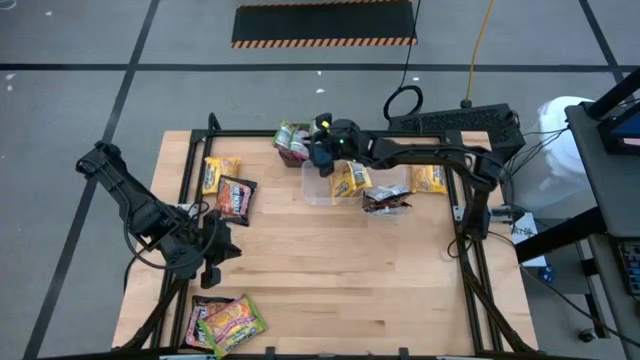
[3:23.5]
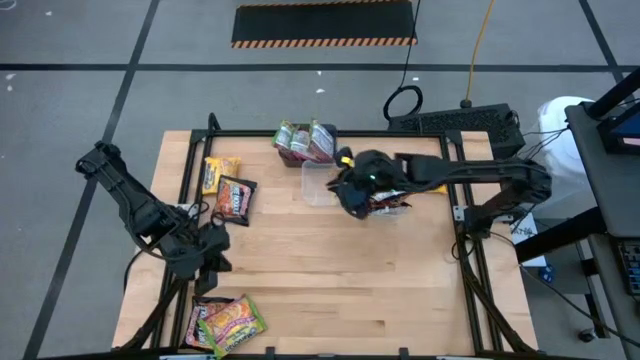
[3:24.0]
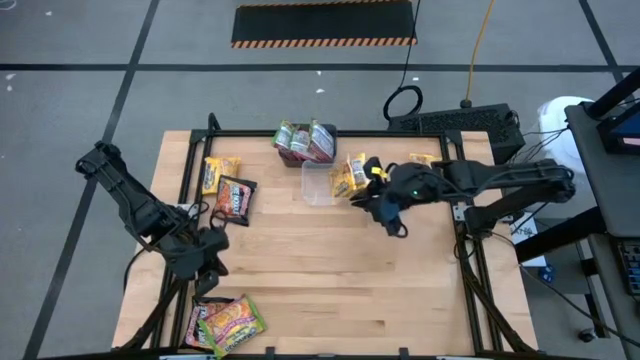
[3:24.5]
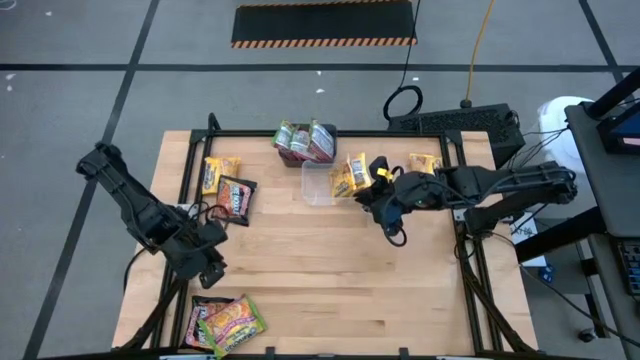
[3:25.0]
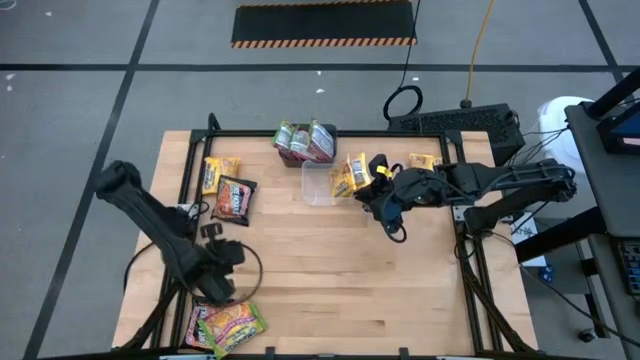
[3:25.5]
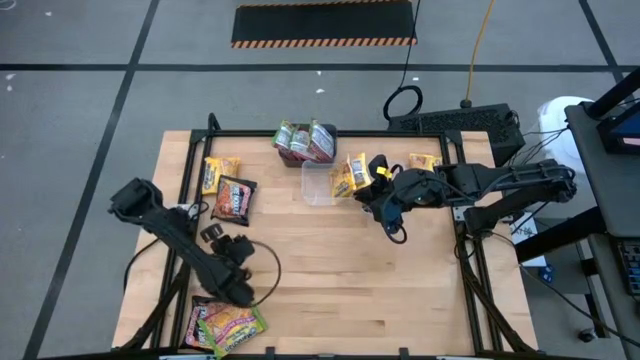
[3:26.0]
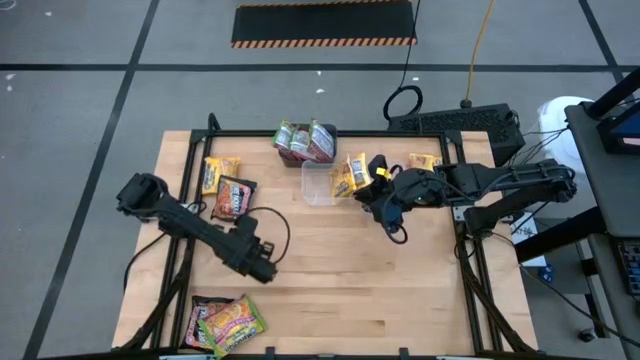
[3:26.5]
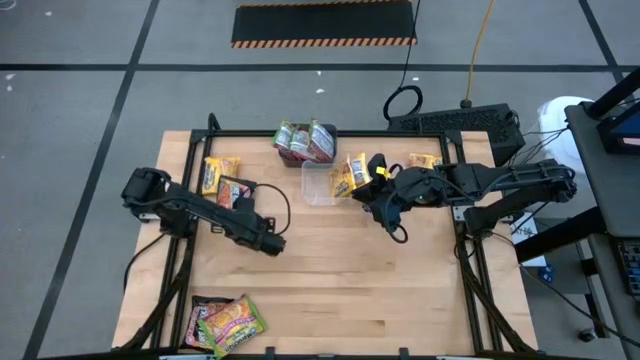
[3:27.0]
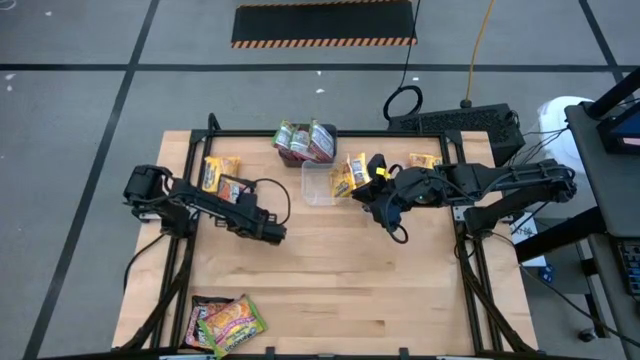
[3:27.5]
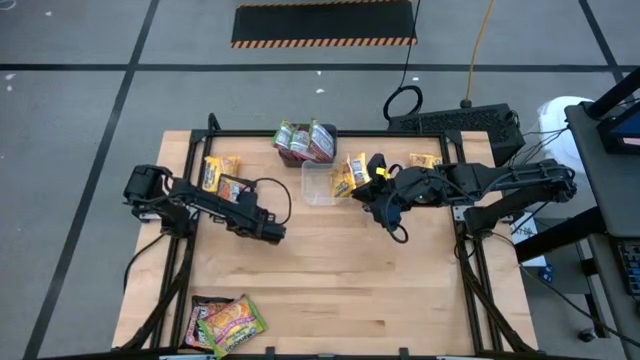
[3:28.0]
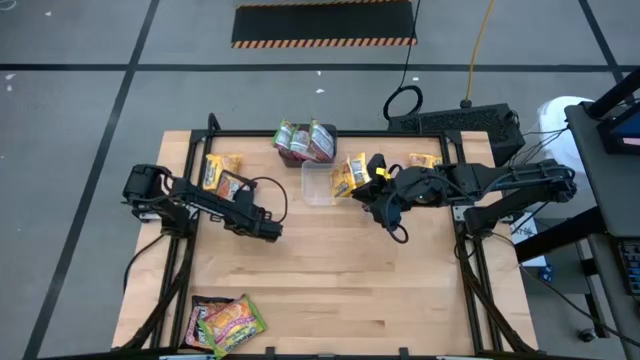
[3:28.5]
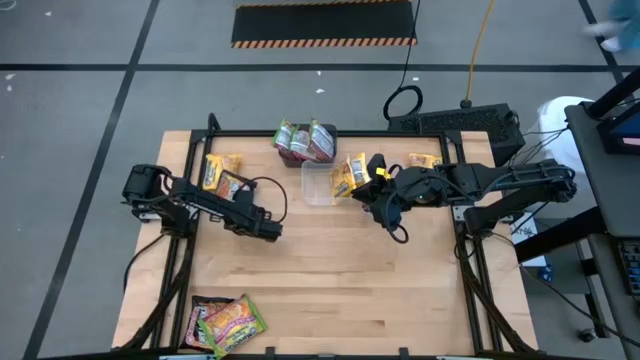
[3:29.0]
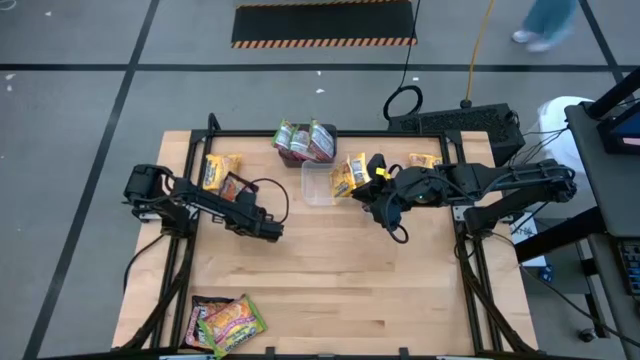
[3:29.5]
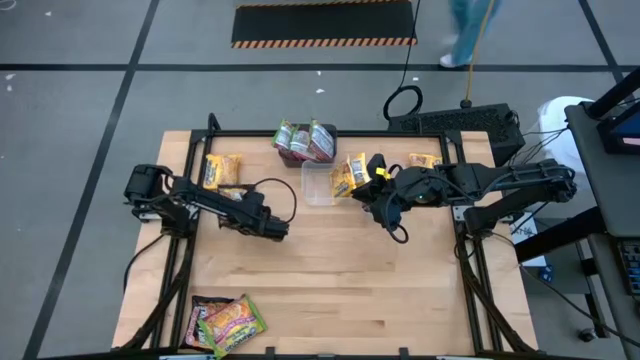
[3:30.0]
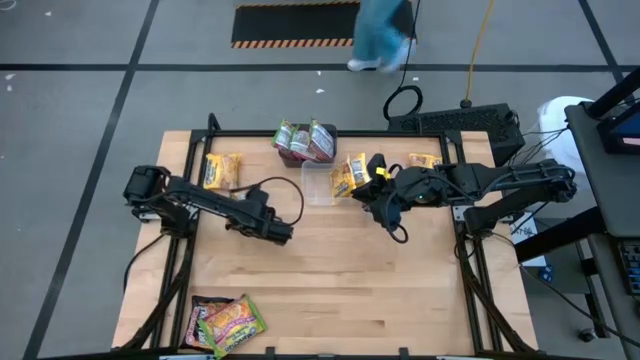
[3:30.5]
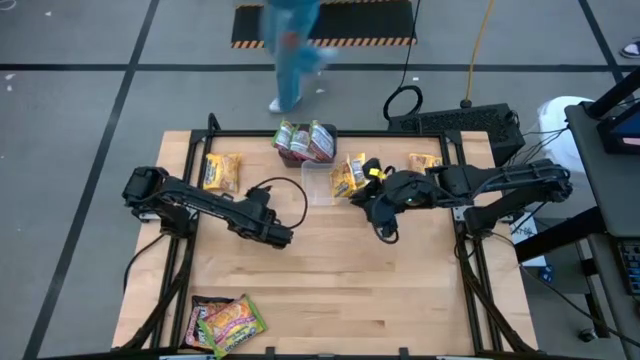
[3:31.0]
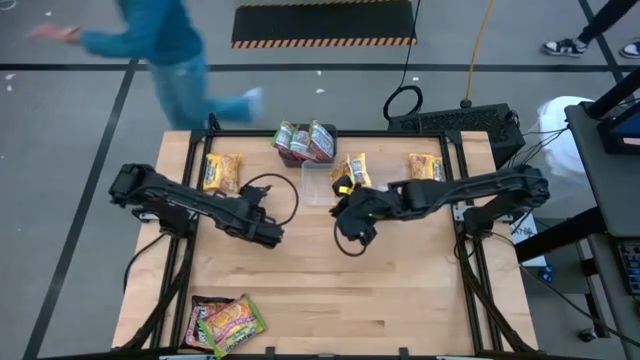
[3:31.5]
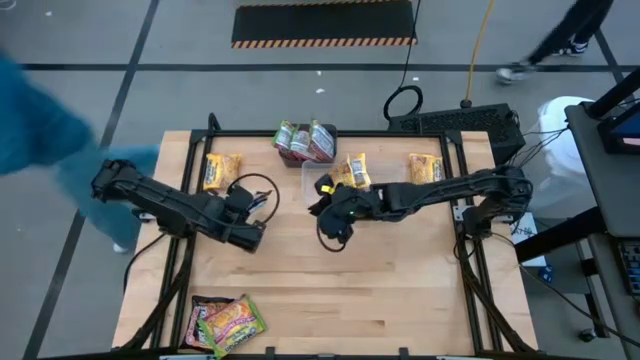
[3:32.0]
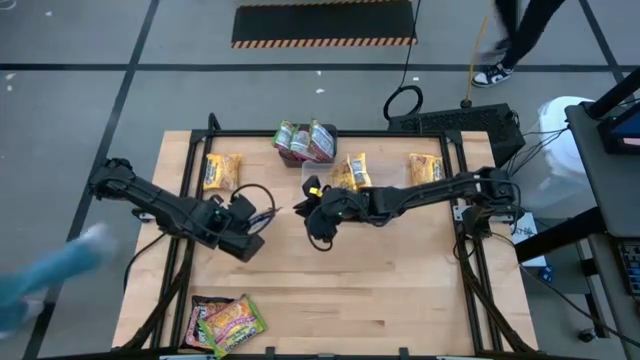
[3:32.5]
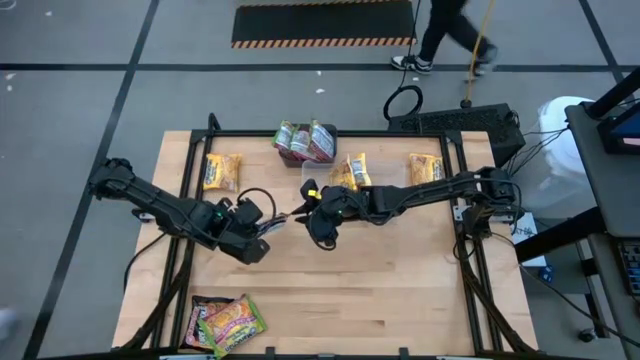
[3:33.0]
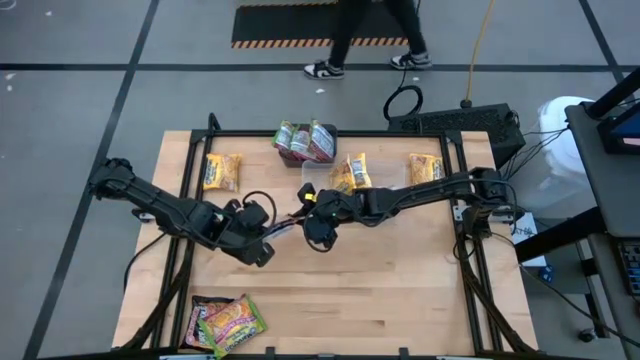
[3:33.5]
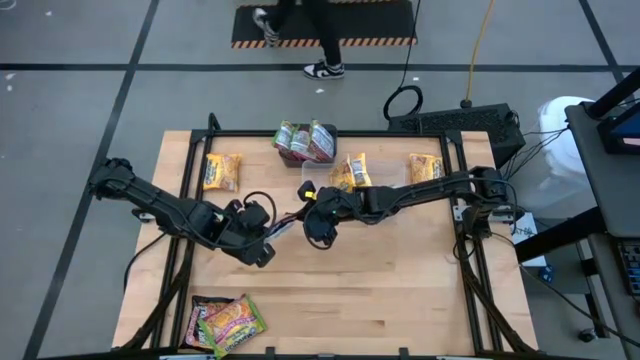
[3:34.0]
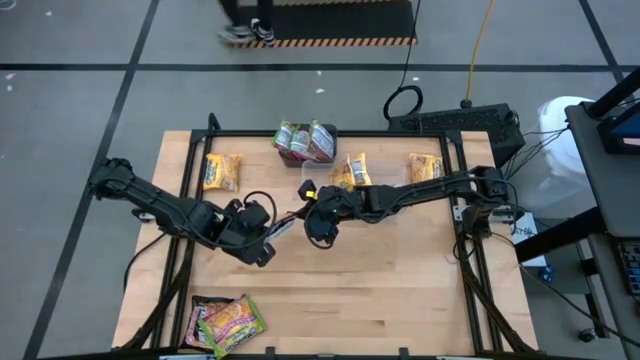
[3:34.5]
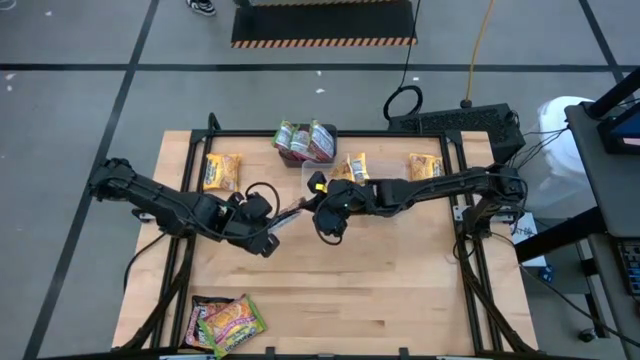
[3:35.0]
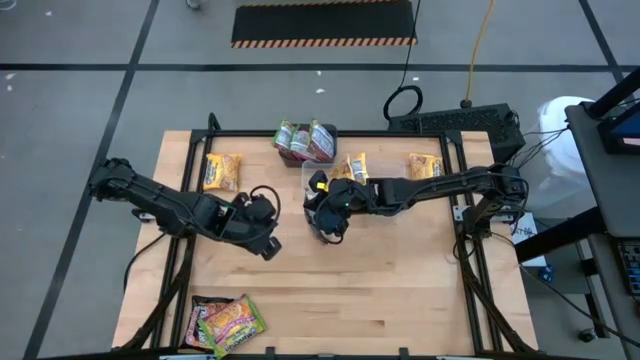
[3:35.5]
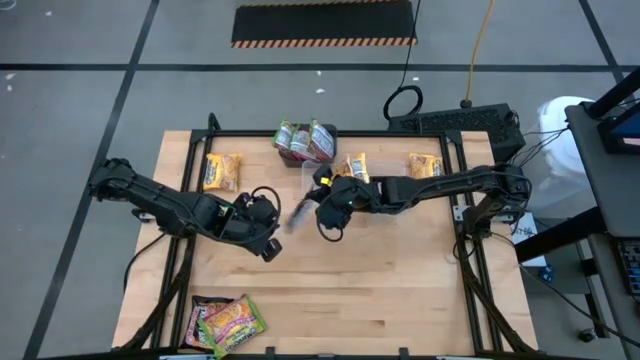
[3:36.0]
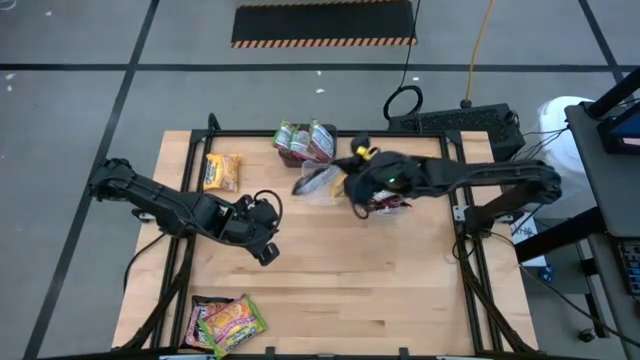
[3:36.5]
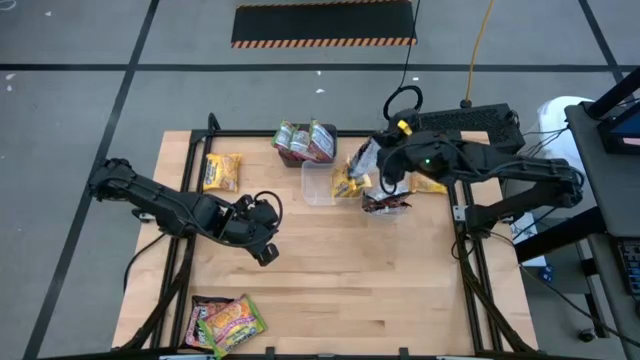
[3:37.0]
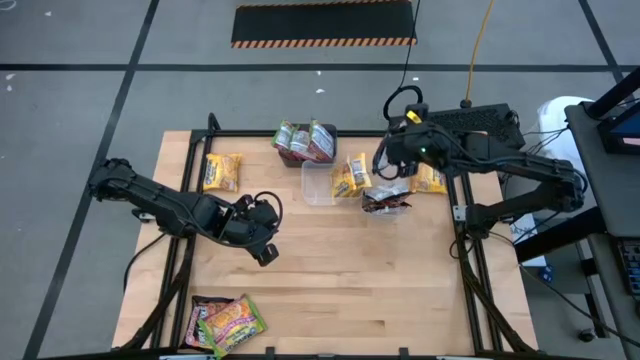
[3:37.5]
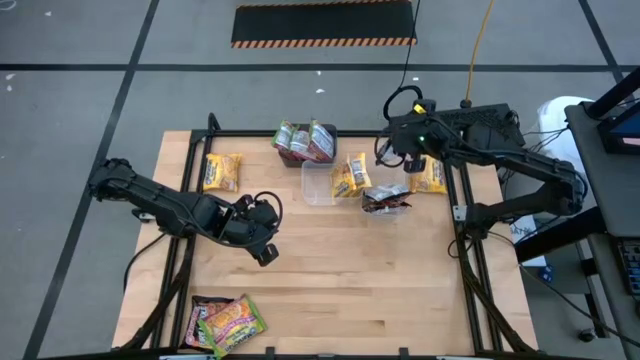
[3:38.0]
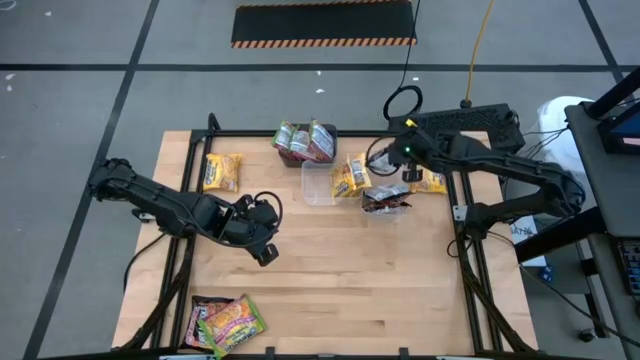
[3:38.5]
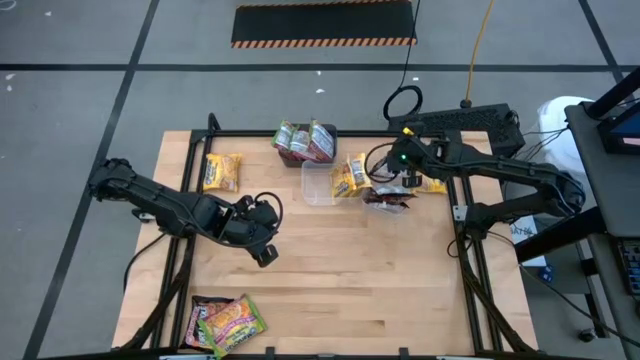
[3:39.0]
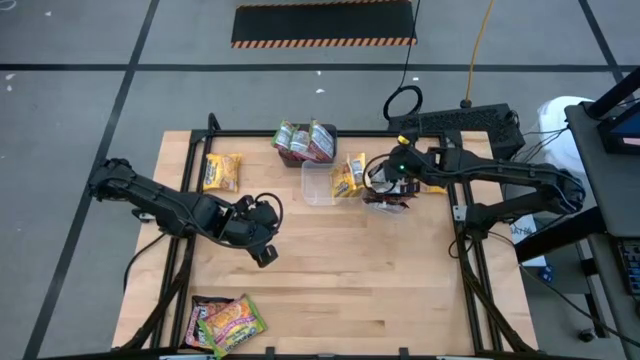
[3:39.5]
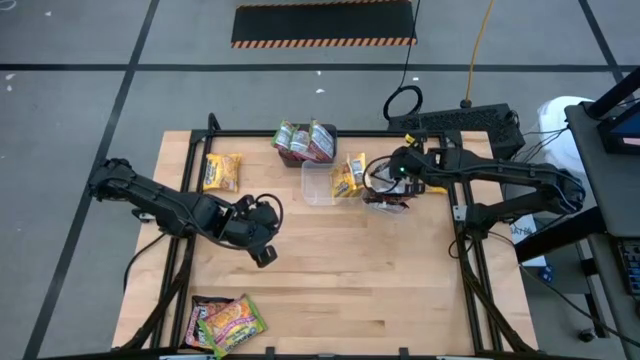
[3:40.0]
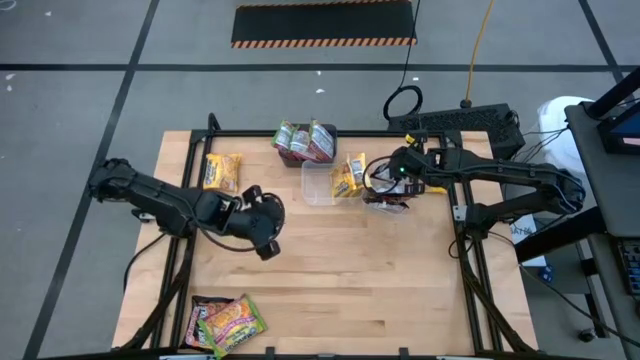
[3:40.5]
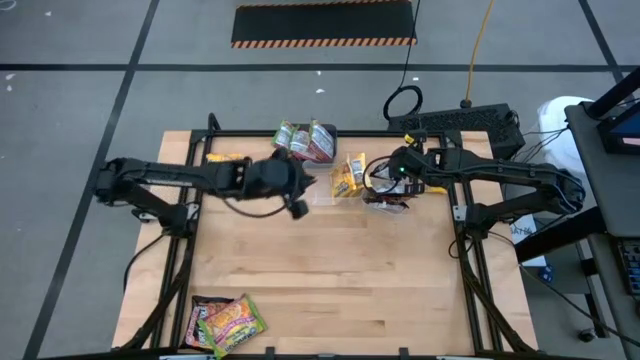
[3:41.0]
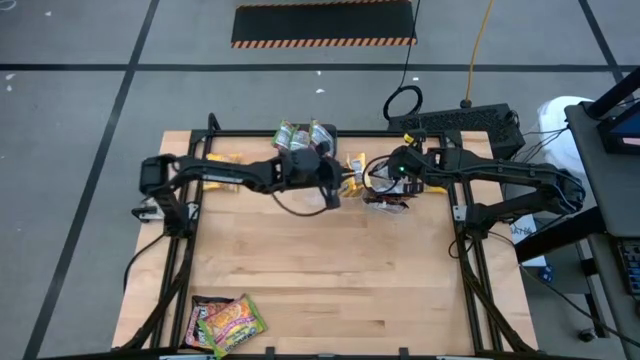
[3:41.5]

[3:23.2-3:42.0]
Task: Sort Maruchan noodles
Put the black noodle pack into the right transparent bin

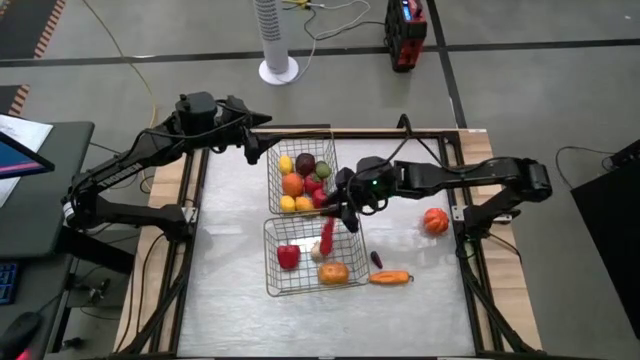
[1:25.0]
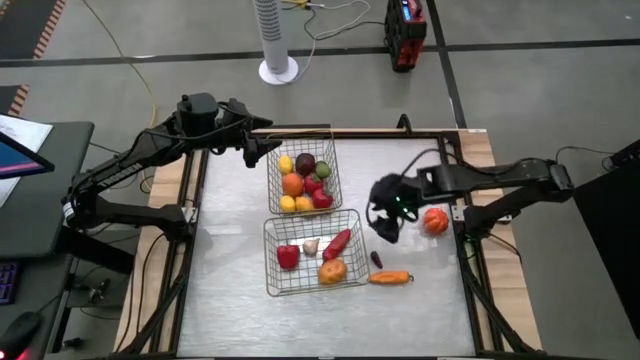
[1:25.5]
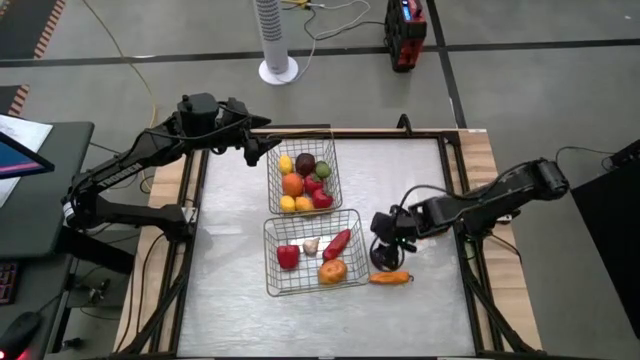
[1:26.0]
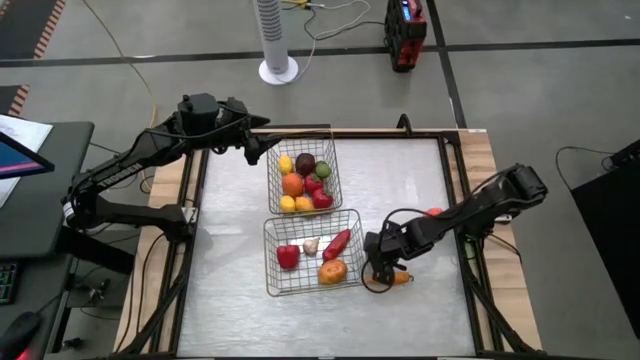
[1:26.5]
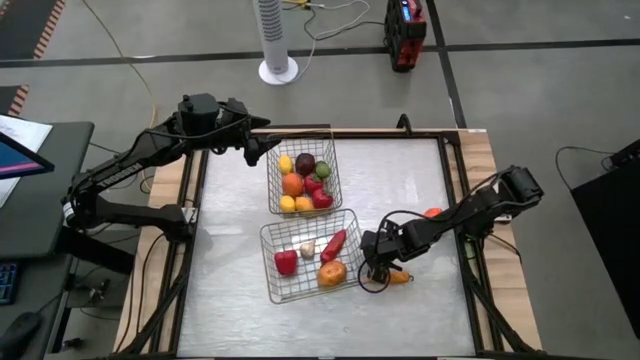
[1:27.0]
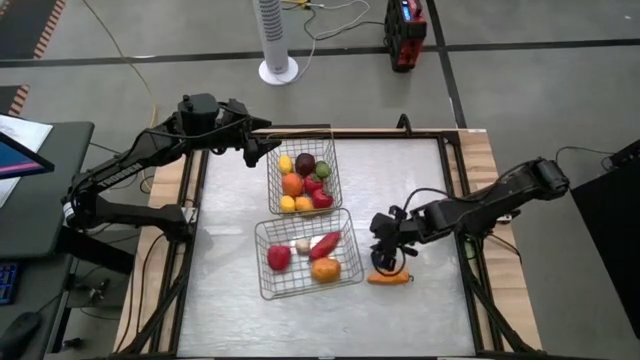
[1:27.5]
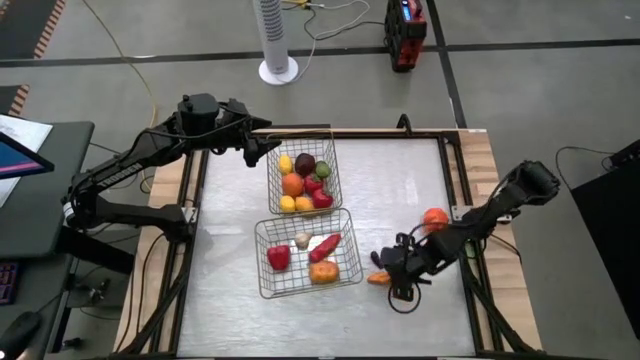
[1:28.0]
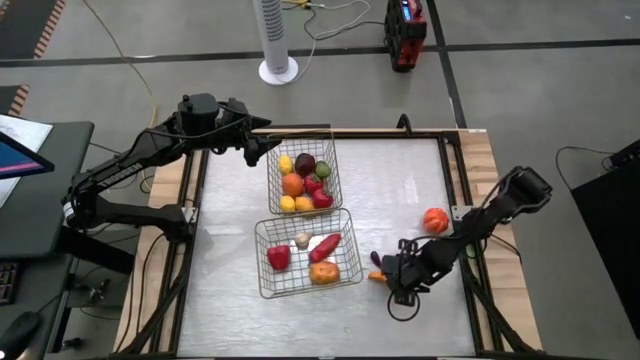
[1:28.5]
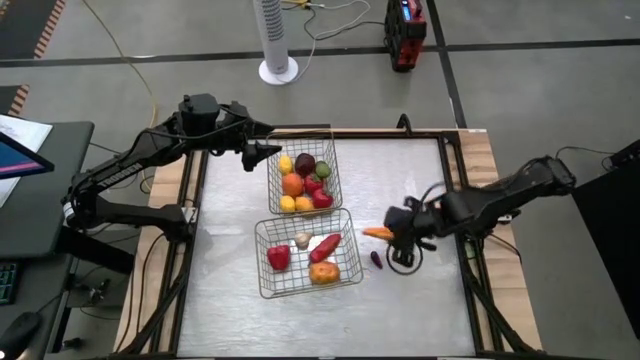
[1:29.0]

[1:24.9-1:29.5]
Task: Sort produce into baskets
Put the yellow chili pepper into the bottom wire basket
